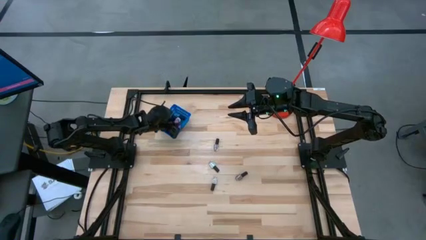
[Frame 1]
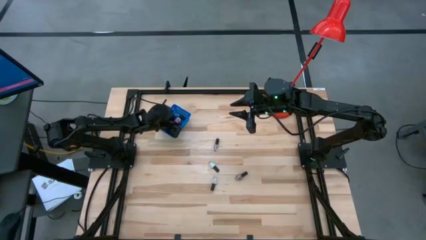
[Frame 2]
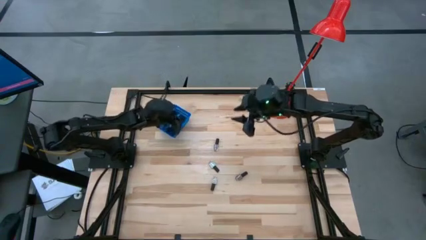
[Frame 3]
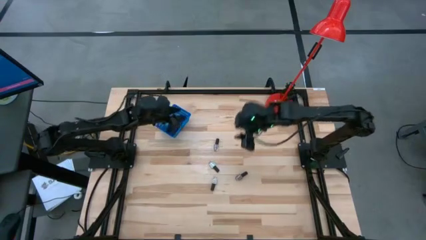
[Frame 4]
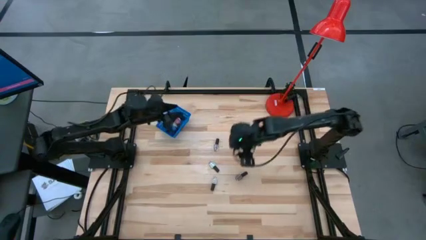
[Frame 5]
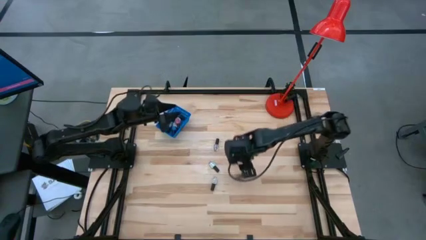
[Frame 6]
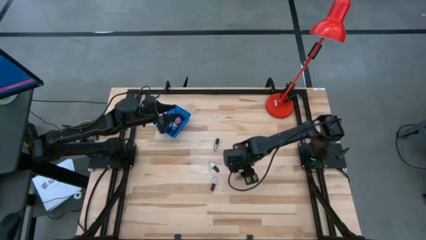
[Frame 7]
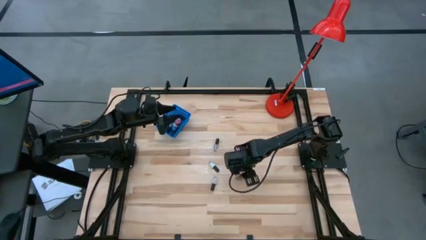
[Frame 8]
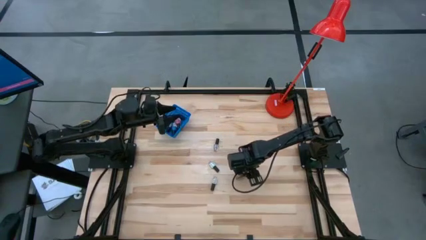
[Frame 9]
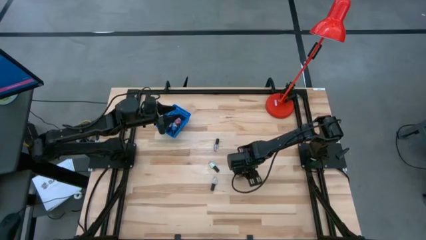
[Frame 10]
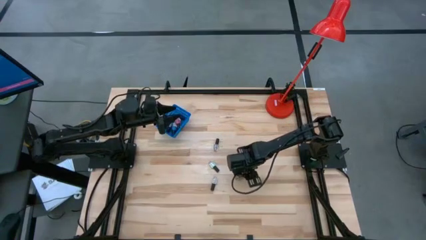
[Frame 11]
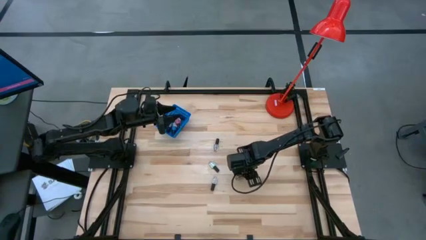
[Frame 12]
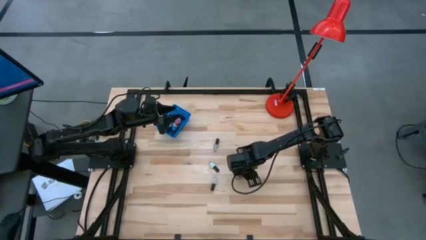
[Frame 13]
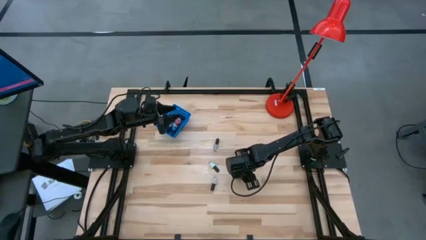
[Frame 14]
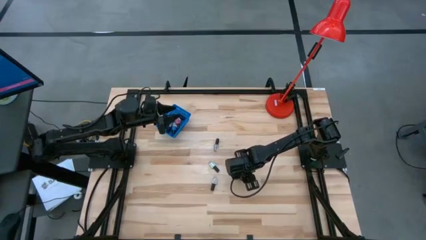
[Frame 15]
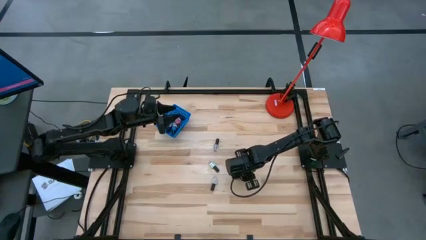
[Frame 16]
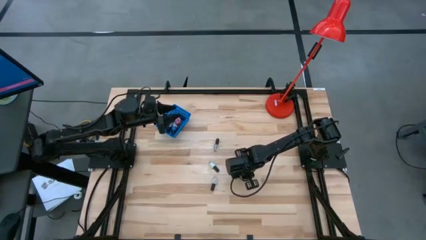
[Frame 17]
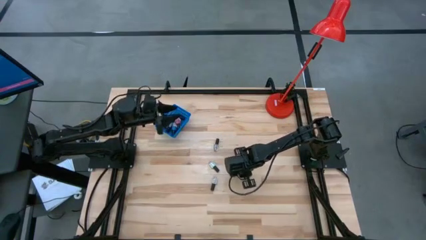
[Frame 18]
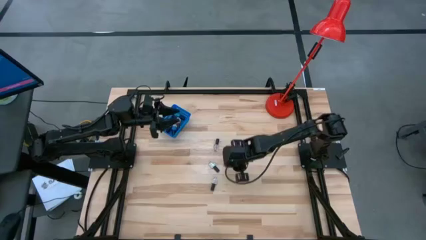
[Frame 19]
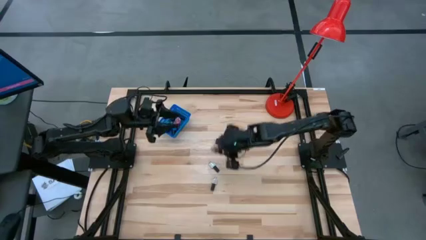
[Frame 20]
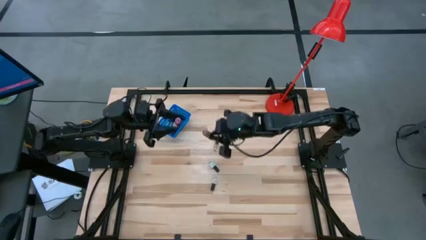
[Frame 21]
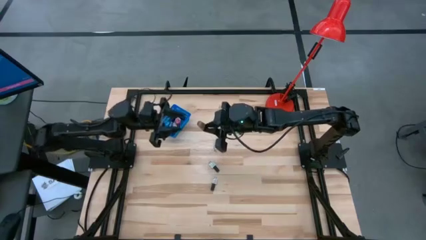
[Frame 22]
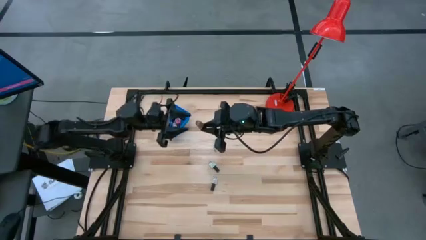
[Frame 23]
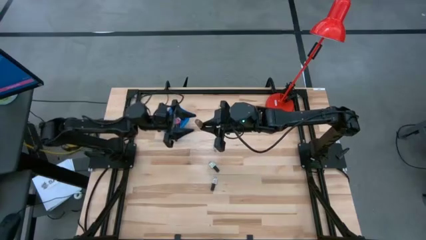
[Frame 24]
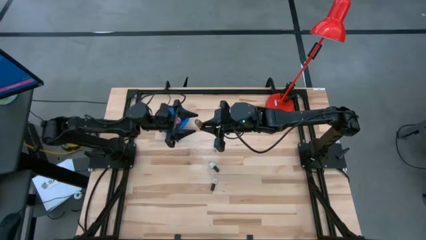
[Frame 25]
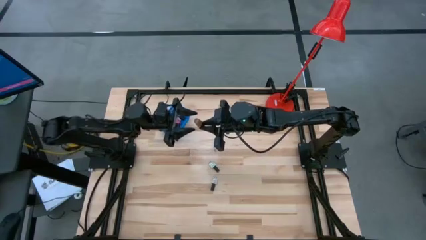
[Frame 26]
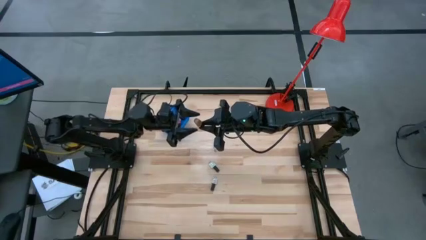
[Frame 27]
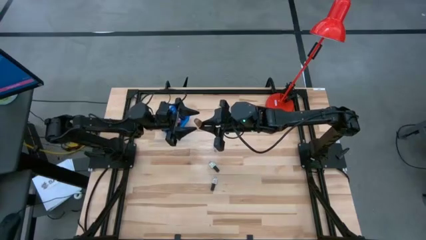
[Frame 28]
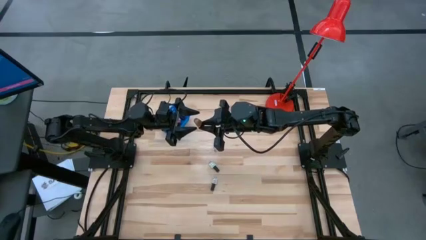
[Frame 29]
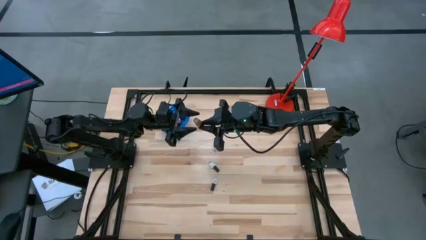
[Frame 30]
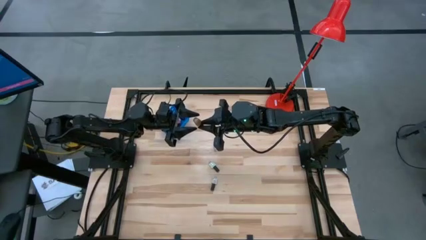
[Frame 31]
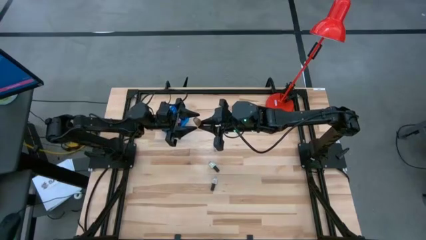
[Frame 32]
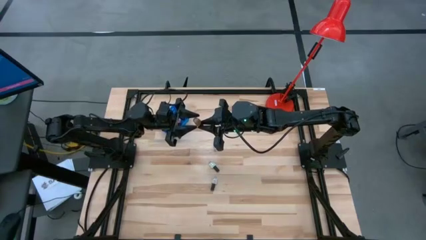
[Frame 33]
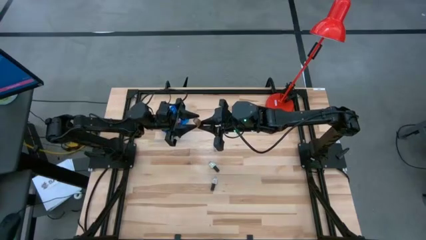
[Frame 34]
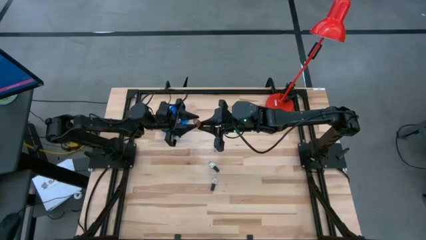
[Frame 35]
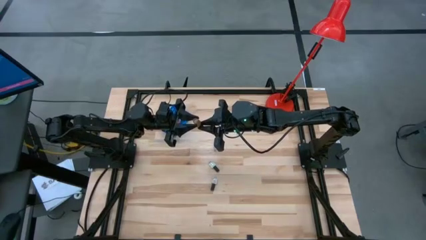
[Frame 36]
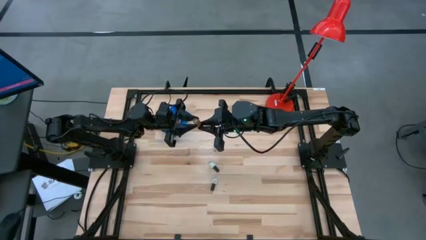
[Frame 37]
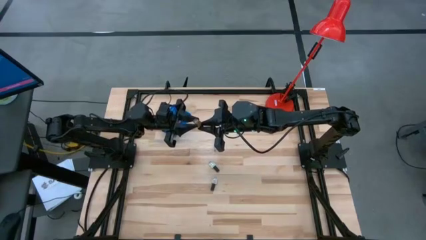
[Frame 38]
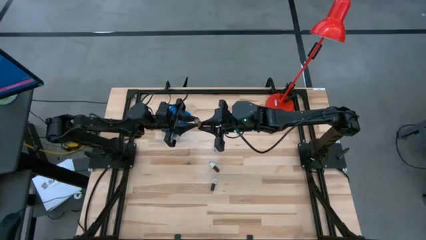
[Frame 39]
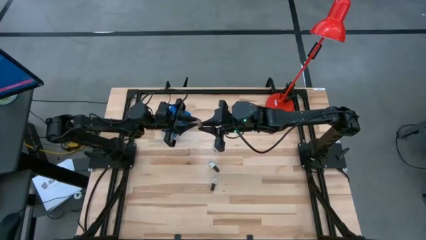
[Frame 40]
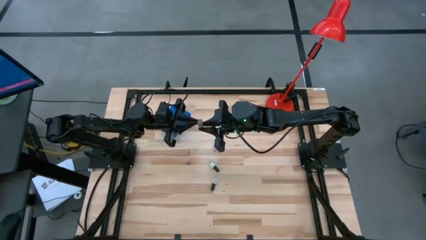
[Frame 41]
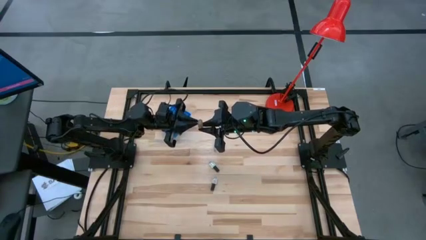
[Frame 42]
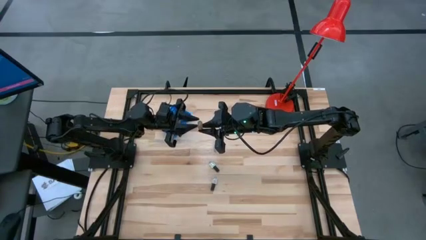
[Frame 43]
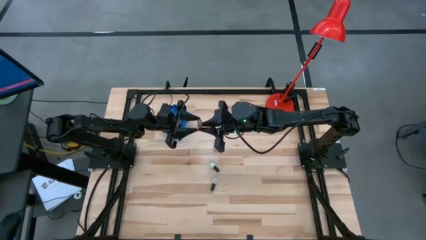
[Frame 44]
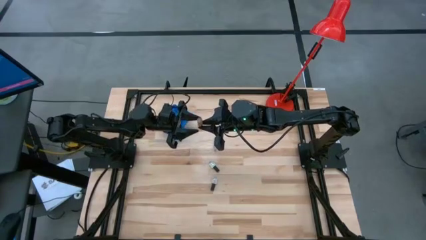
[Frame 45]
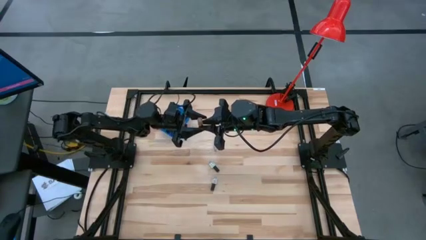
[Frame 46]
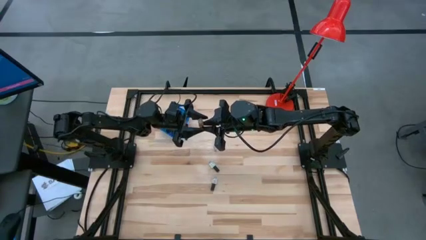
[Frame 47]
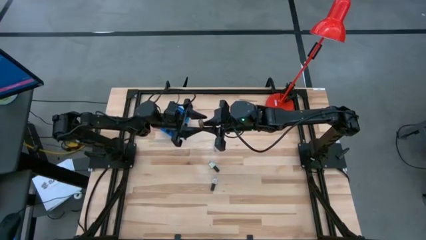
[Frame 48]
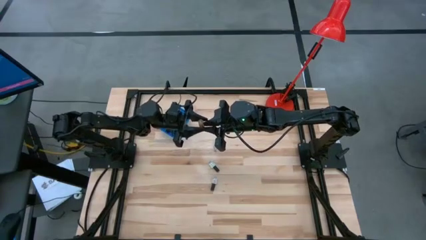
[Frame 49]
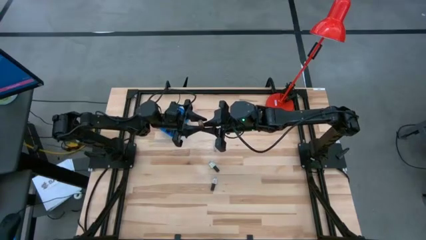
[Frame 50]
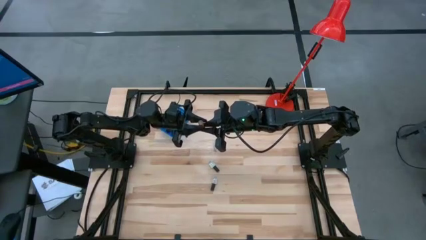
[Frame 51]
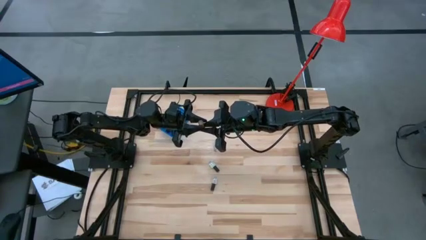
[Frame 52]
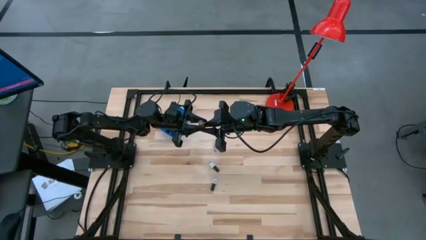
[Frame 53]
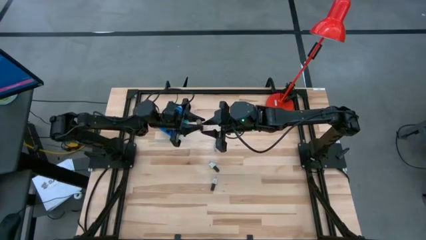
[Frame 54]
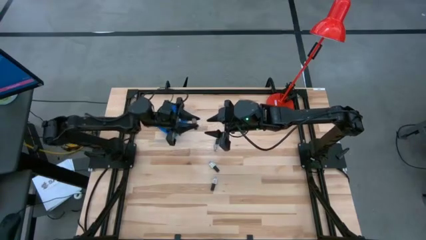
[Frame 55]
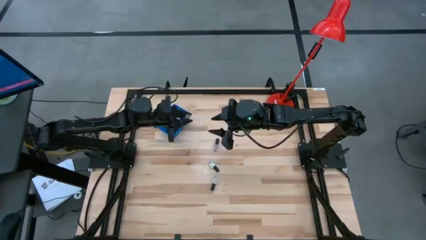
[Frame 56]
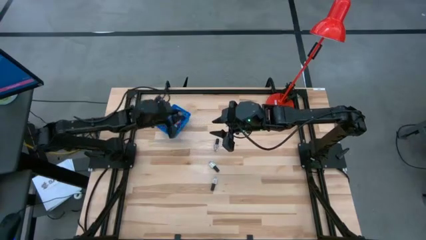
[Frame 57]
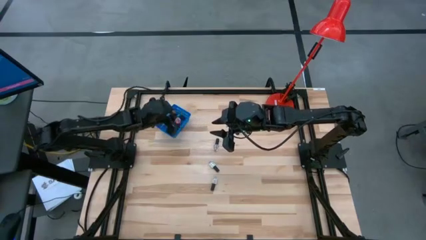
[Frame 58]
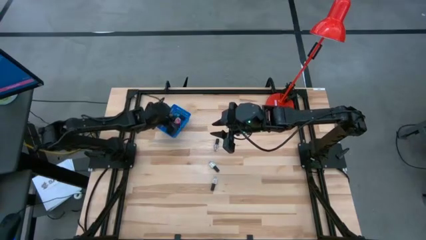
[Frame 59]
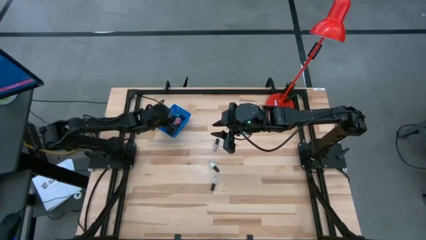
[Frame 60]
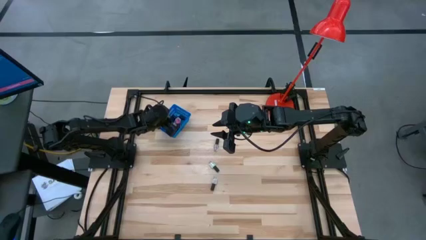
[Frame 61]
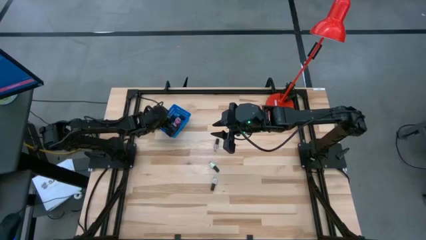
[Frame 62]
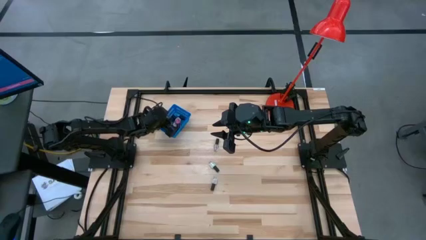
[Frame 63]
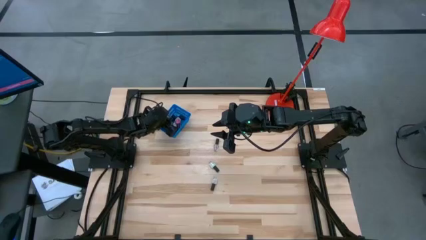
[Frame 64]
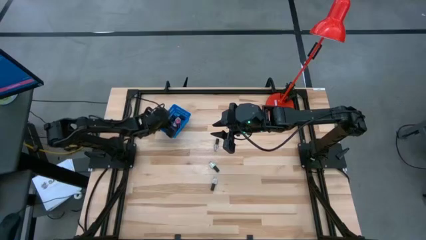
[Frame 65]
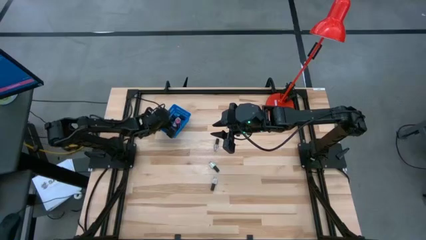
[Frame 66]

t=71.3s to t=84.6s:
Task: Pick & Place Nail Polish
Put the brown nail polish bottle into the blue bin
